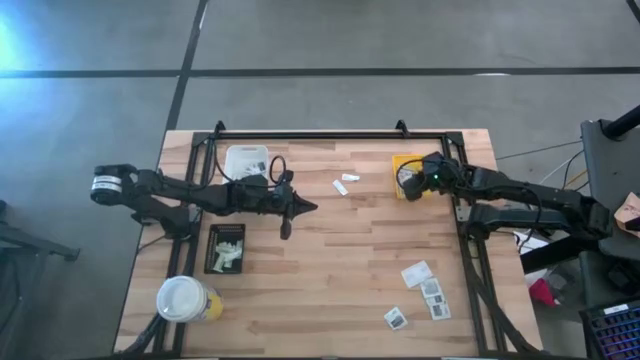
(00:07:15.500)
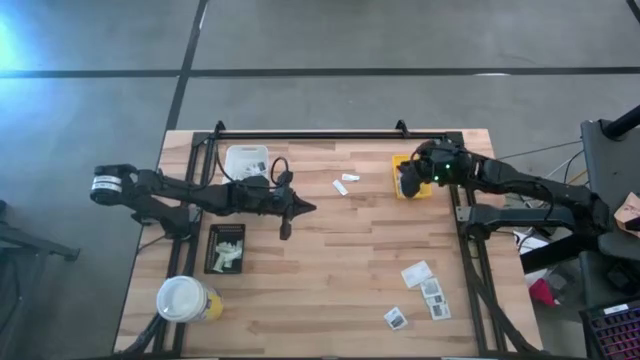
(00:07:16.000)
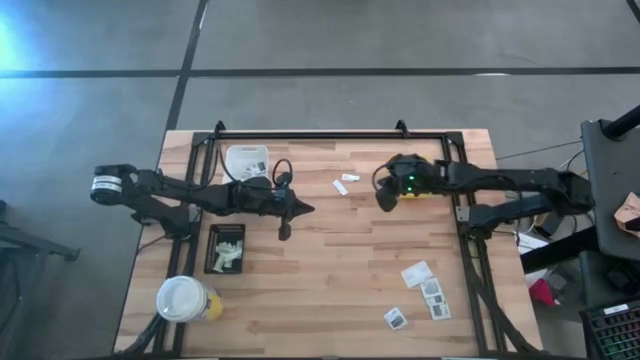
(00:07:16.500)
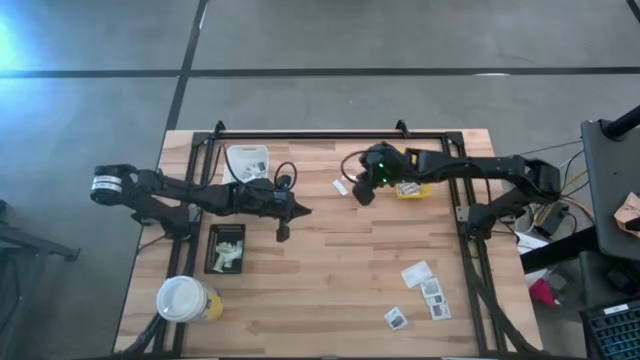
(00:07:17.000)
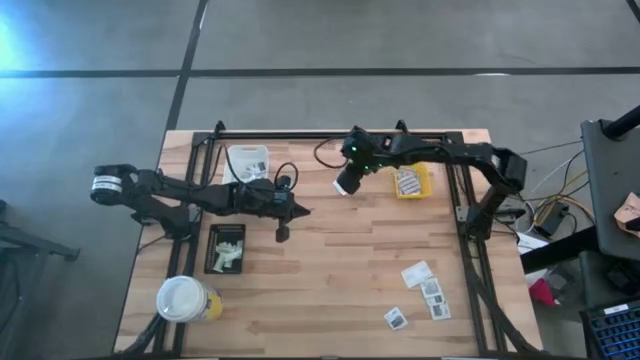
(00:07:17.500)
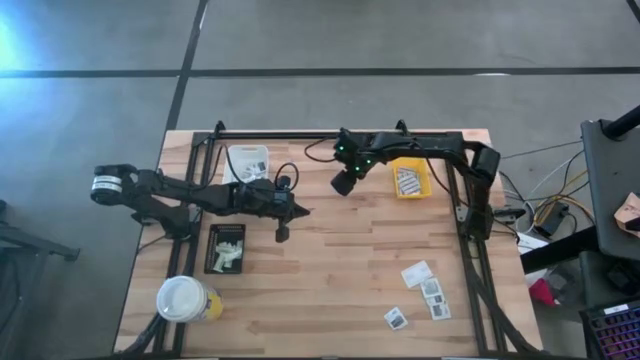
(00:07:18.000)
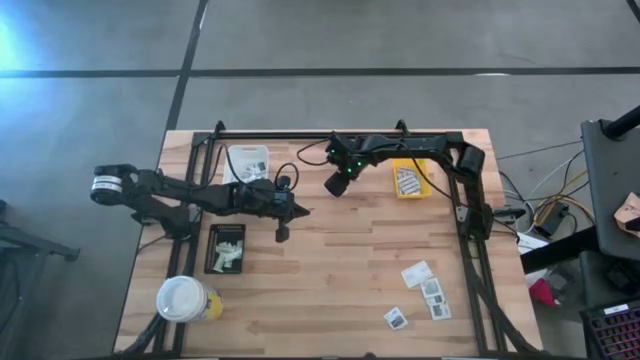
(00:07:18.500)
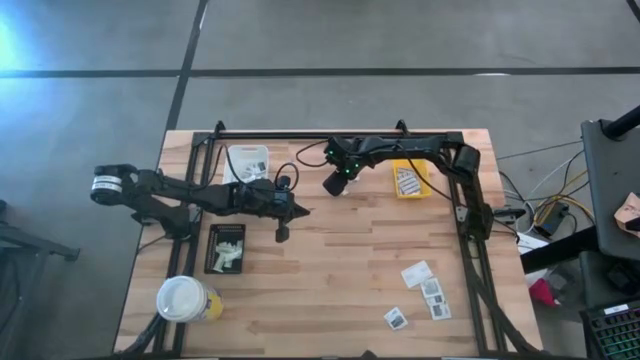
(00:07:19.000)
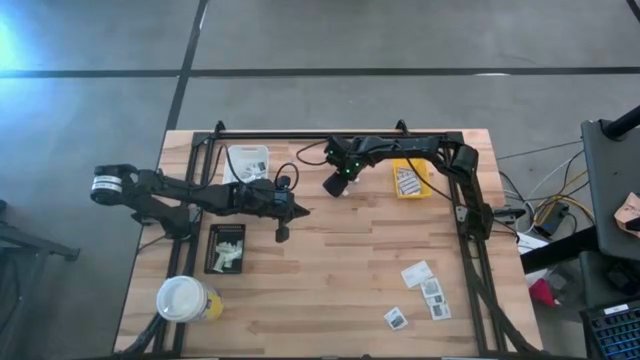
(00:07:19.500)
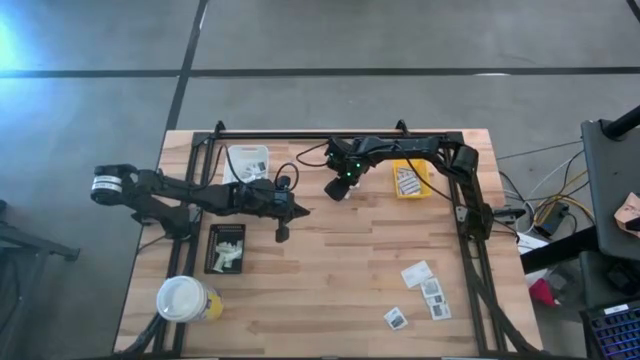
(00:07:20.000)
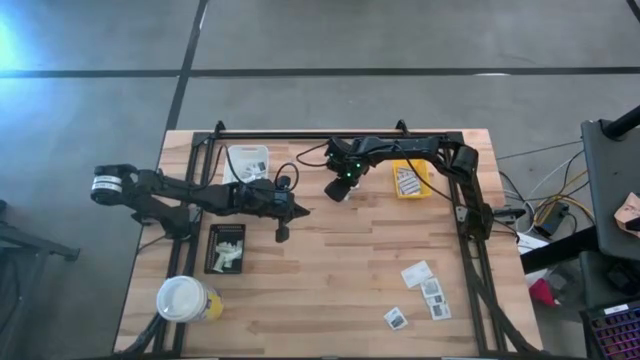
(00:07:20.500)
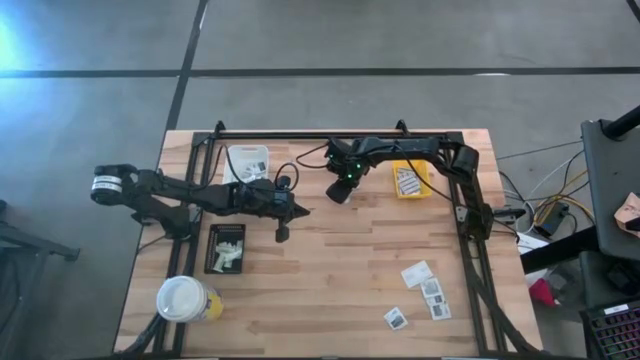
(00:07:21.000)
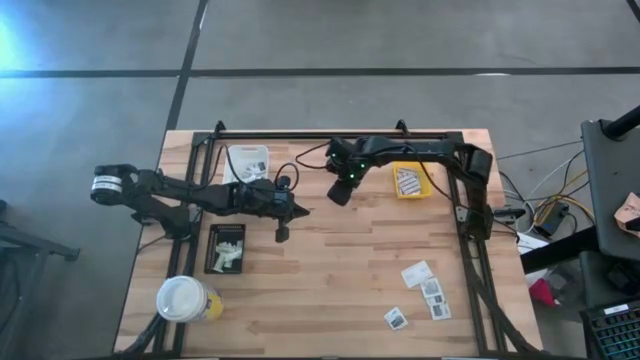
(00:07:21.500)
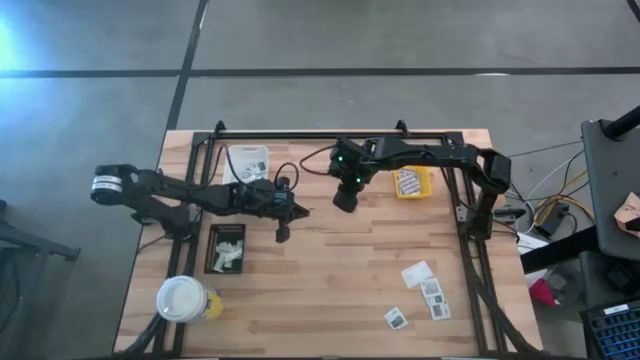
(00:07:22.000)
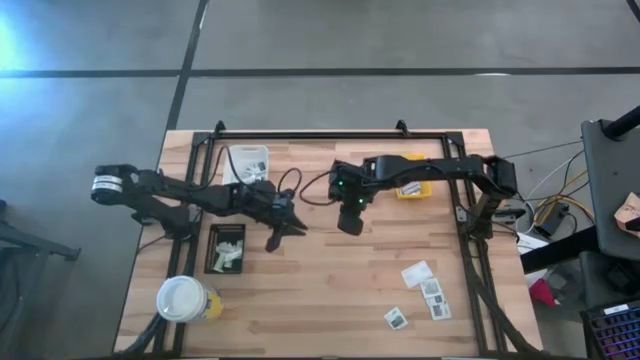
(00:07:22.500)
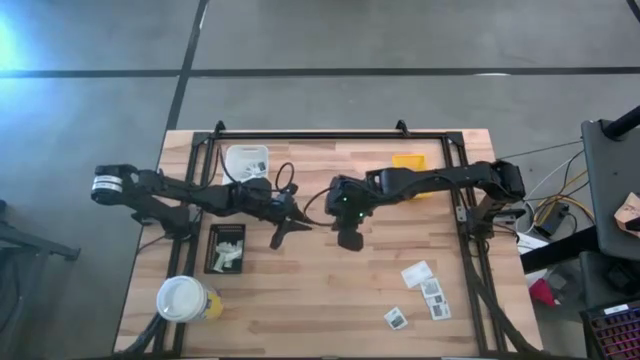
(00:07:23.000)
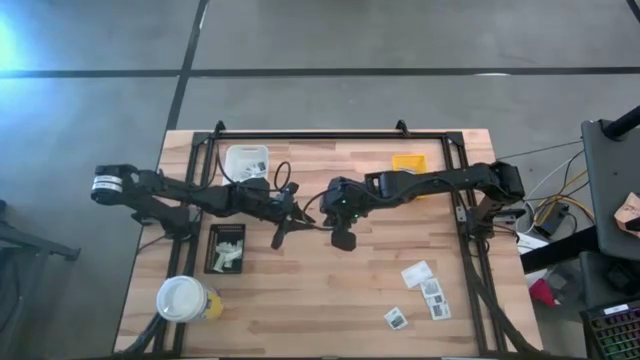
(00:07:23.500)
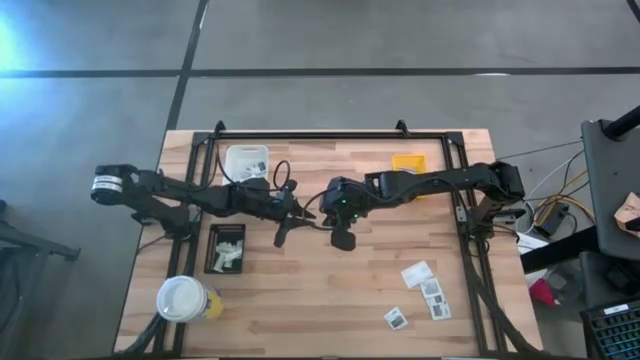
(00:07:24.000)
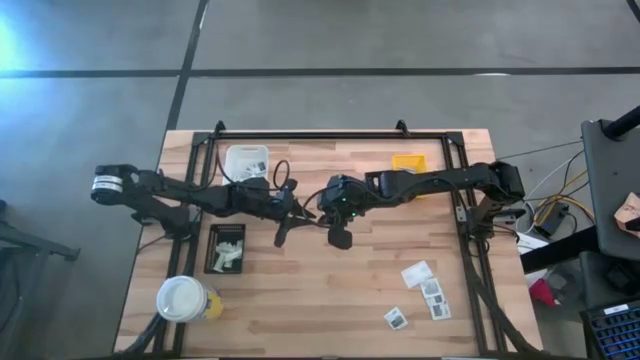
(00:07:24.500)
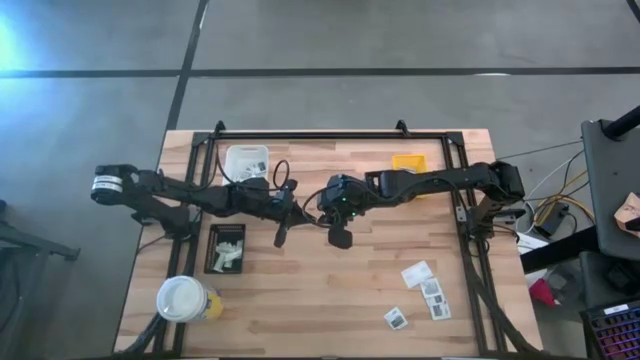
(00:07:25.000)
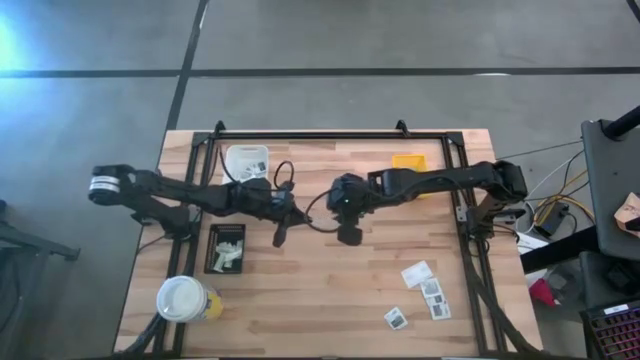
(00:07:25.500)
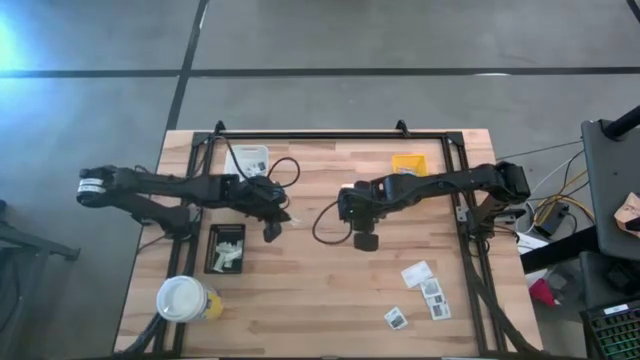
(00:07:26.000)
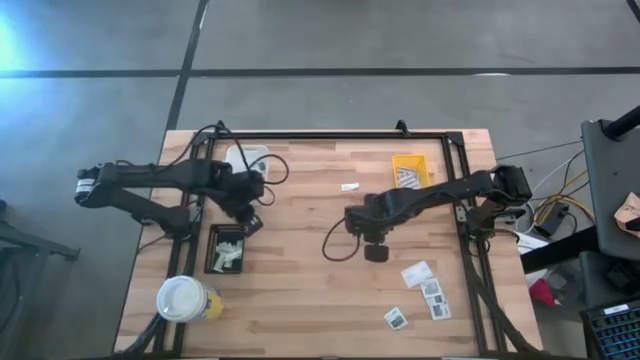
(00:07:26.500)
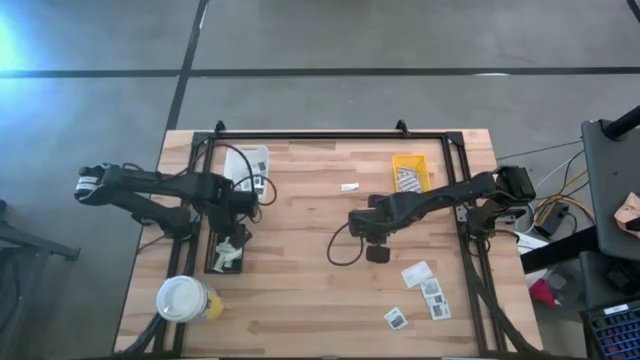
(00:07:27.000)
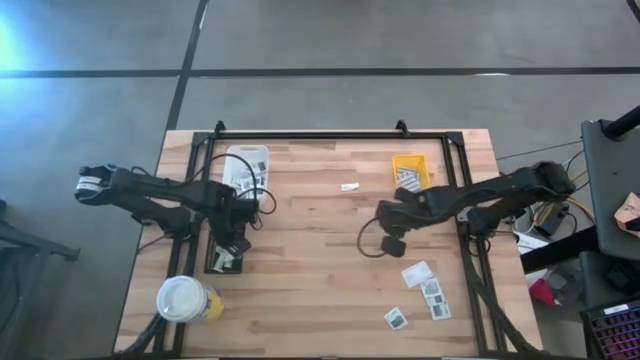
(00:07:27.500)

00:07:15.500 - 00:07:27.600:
Task: Pick & Place First Aid Supplies
Put the green bandage pack into the black bin

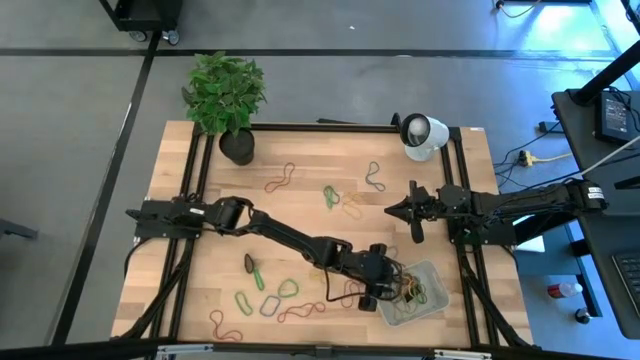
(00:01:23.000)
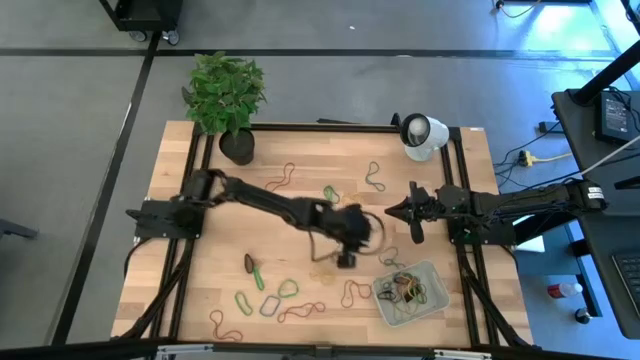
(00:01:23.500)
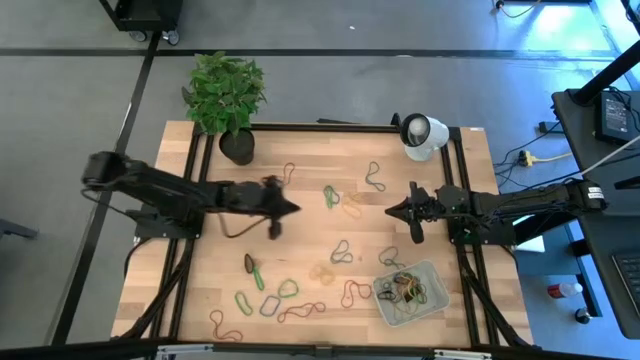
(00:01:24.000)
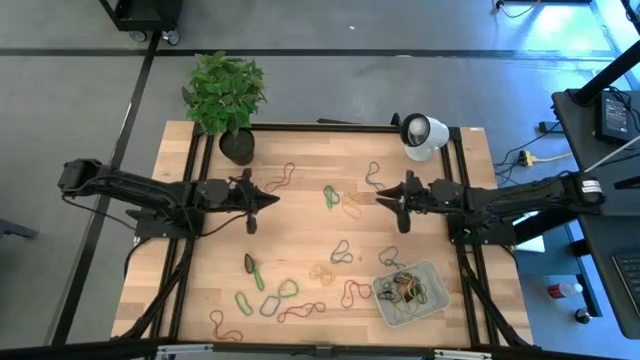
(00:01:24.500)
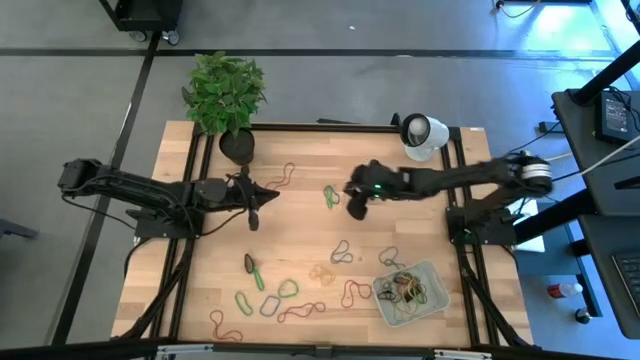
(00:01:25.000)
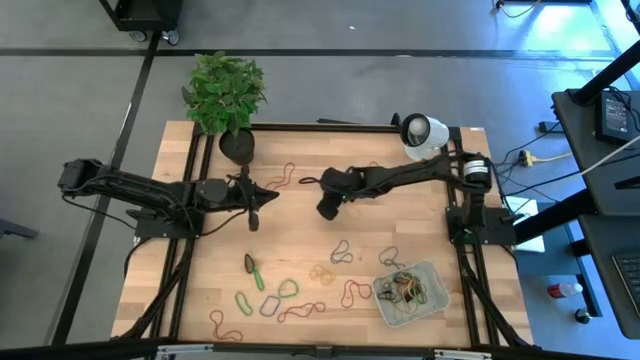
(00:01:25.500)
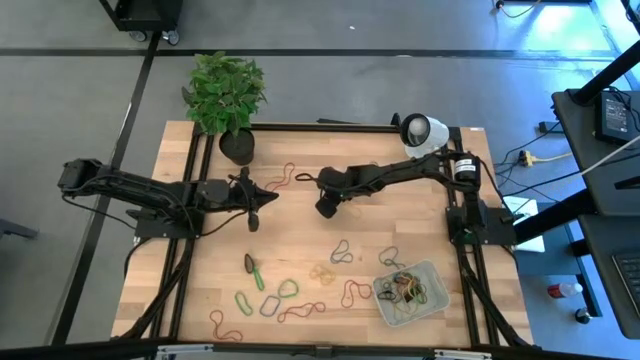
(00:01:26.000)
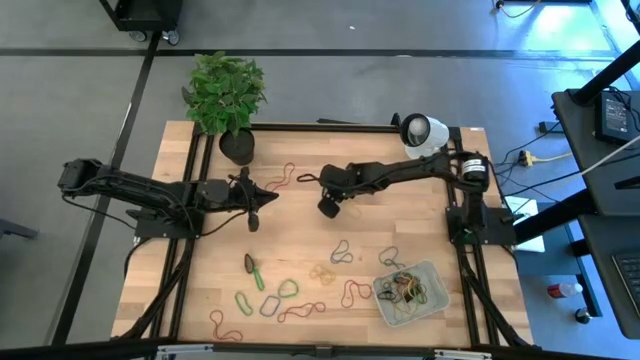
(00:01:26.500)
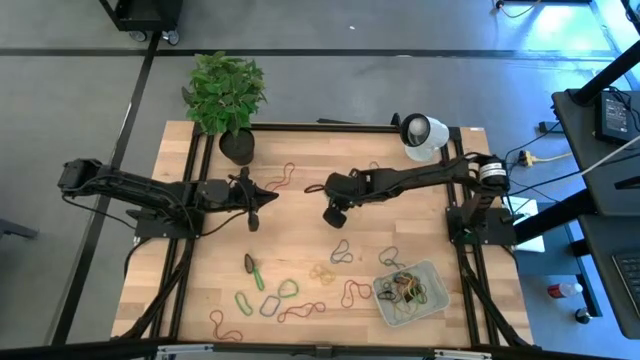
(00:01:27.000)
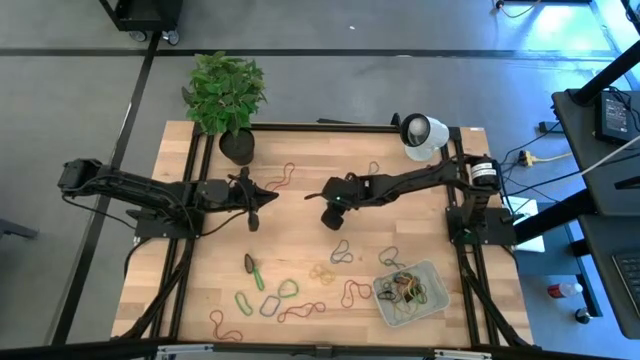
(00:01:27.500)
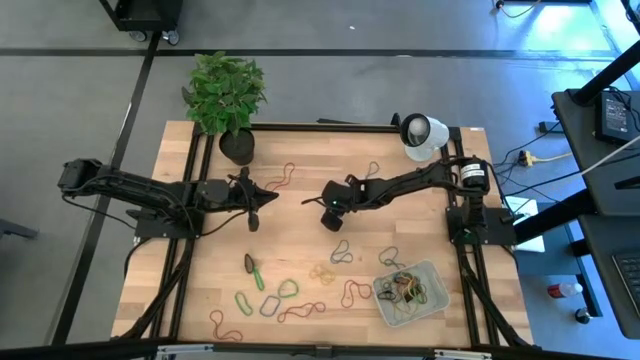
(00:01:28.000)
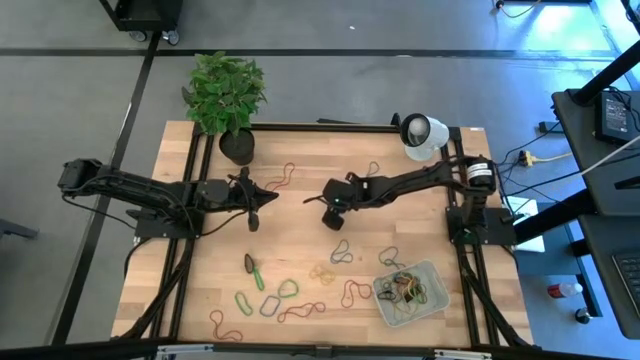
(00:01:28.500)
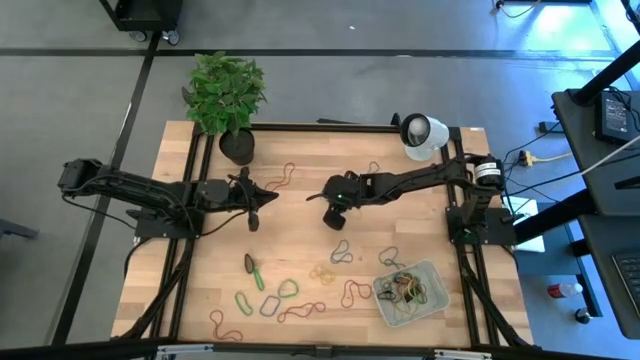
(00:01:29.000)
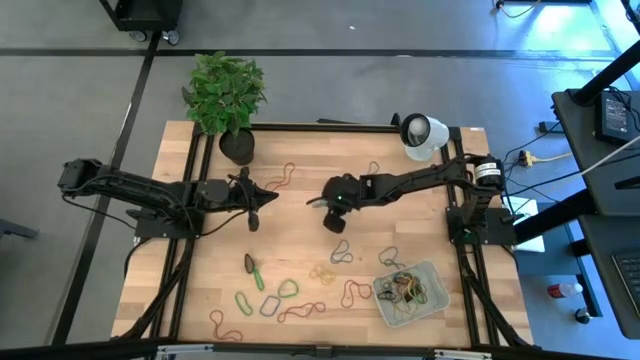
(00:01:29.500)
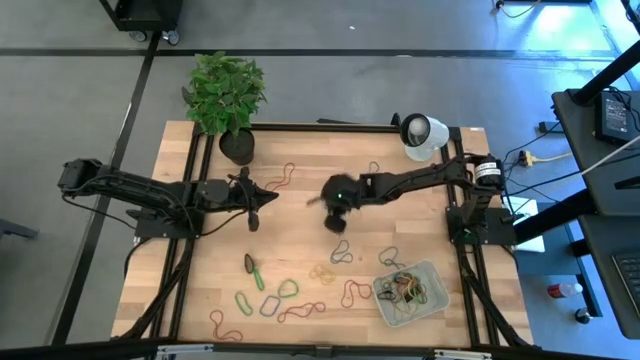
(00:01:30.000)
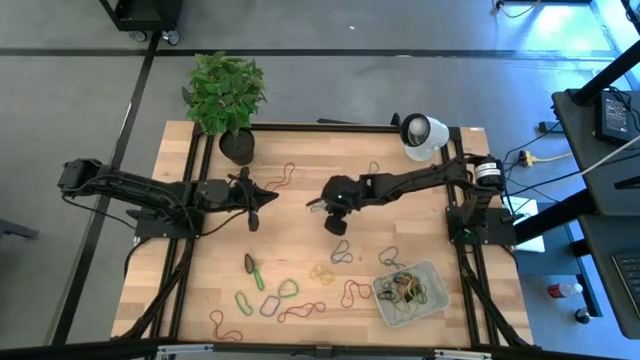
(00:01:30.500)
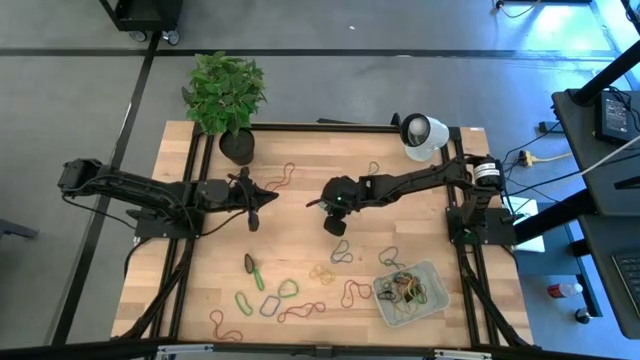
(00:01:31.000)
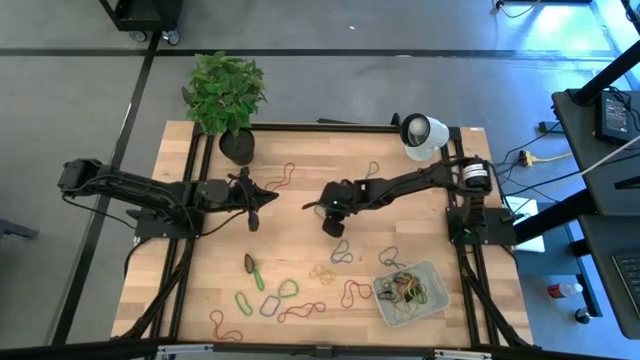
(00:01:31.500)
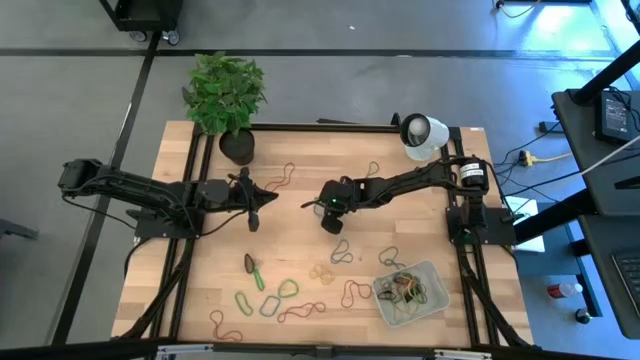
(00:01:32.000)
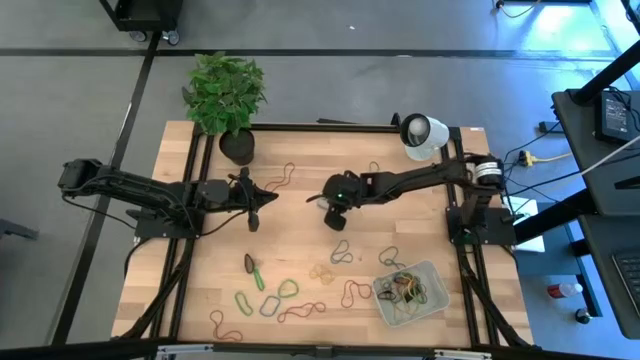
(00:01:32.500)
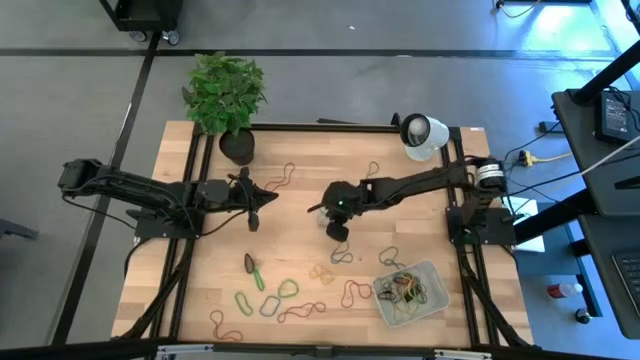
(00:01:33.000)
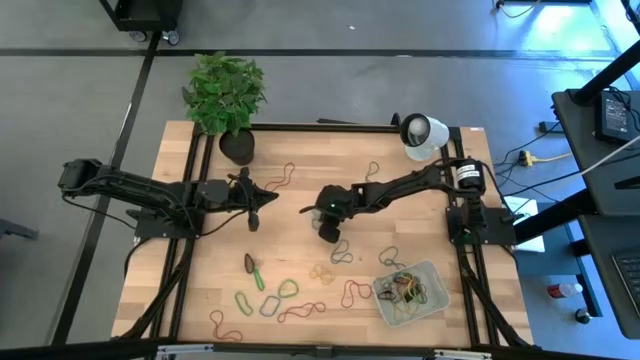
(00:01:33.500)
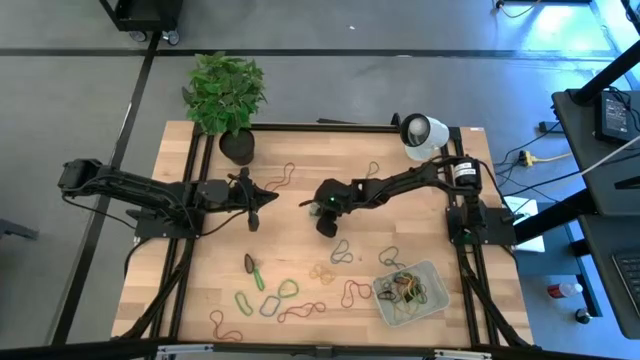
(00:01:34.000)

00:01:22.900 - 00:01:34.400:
Task: Pick and place rubber bands into bin
Put the green rubber band into the white bin
